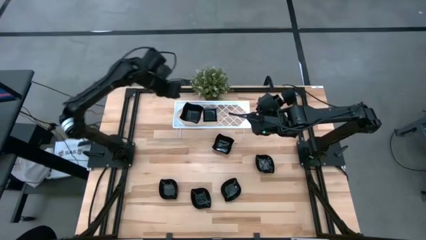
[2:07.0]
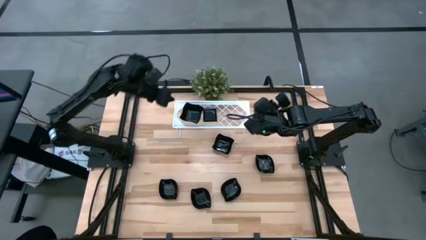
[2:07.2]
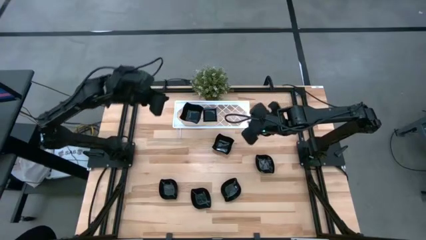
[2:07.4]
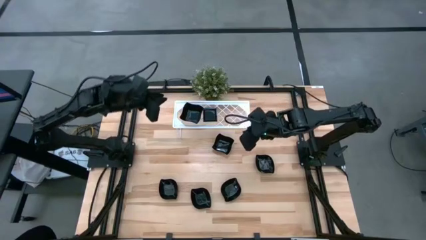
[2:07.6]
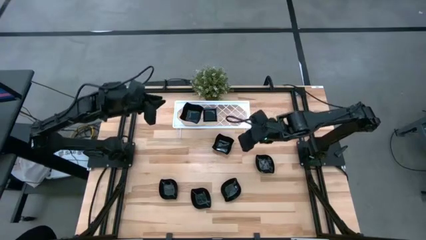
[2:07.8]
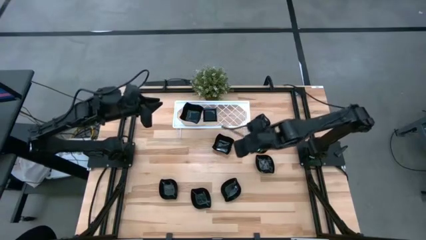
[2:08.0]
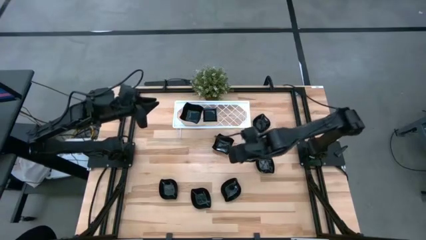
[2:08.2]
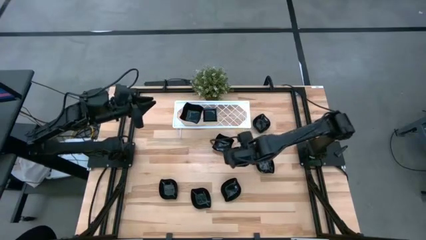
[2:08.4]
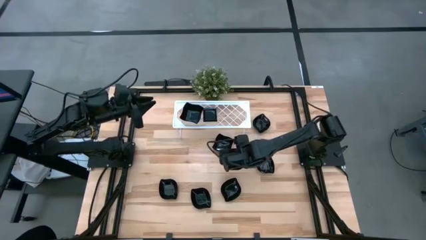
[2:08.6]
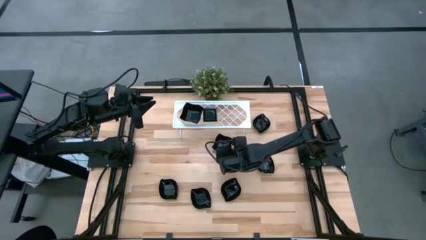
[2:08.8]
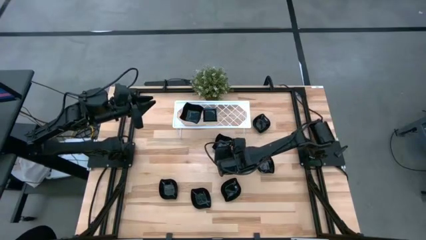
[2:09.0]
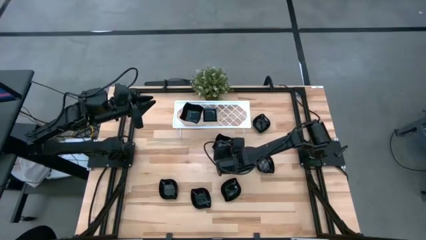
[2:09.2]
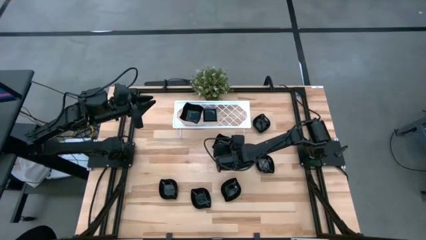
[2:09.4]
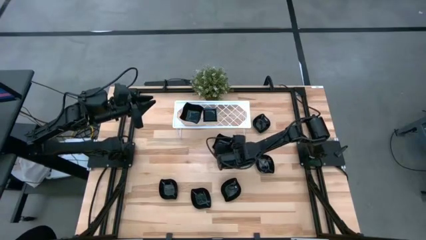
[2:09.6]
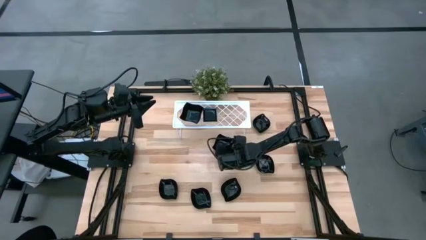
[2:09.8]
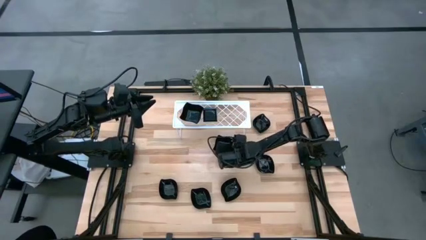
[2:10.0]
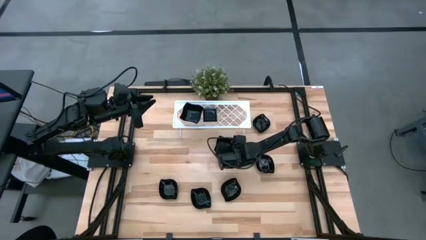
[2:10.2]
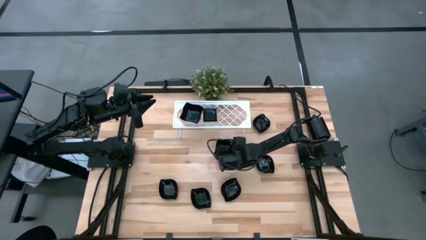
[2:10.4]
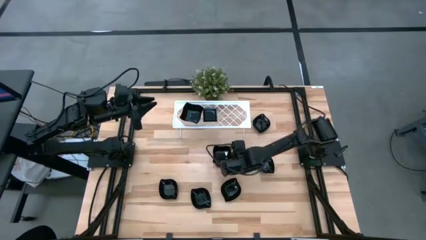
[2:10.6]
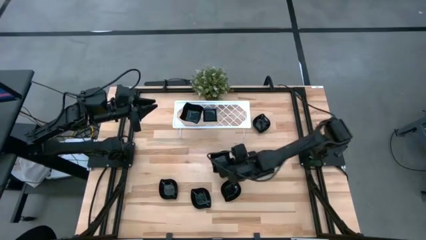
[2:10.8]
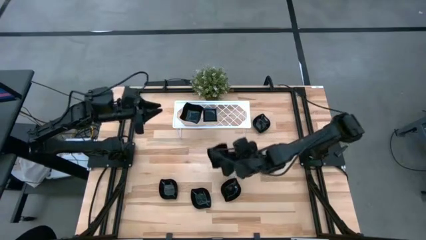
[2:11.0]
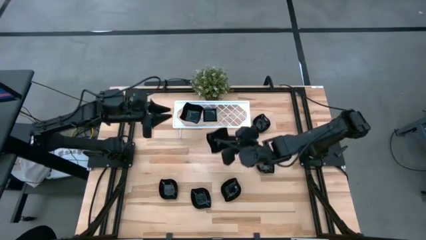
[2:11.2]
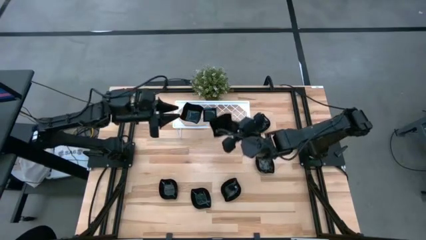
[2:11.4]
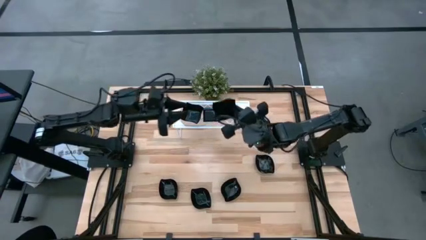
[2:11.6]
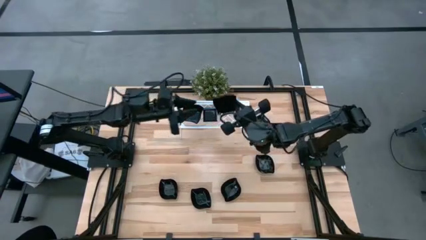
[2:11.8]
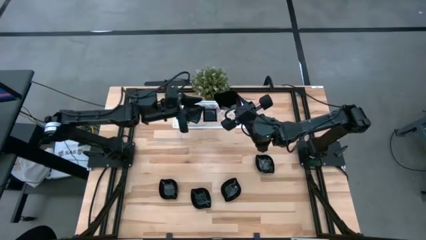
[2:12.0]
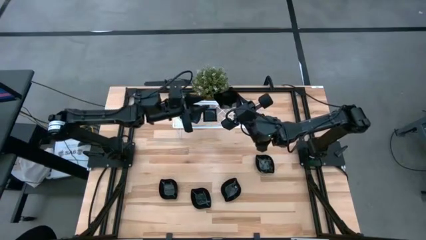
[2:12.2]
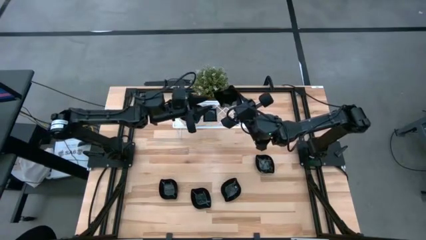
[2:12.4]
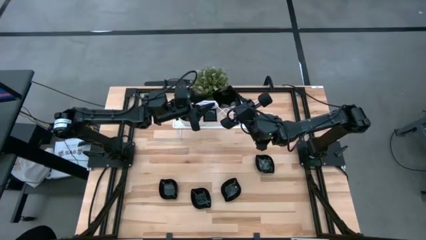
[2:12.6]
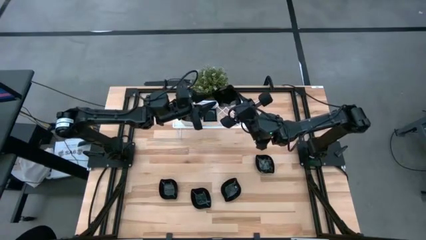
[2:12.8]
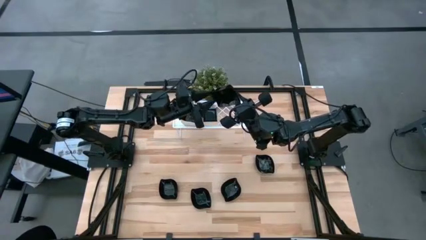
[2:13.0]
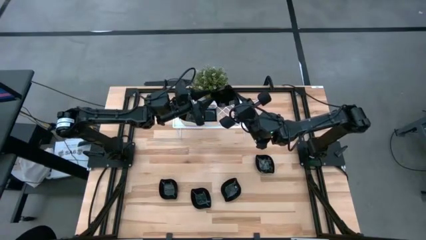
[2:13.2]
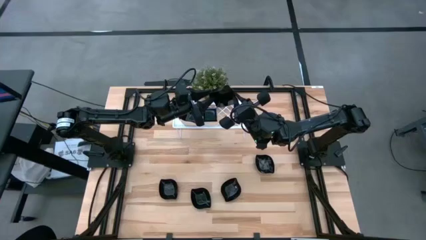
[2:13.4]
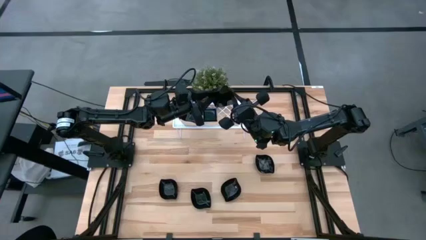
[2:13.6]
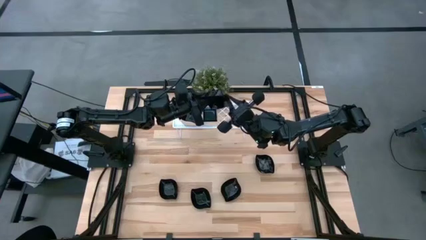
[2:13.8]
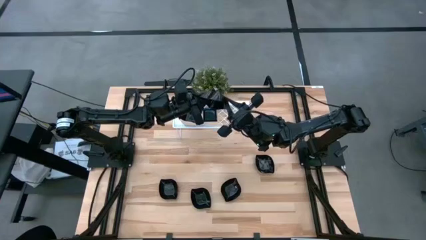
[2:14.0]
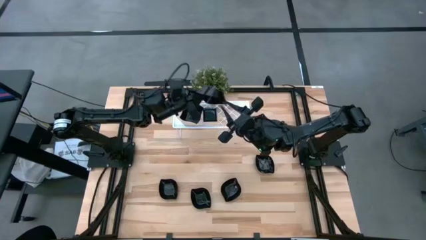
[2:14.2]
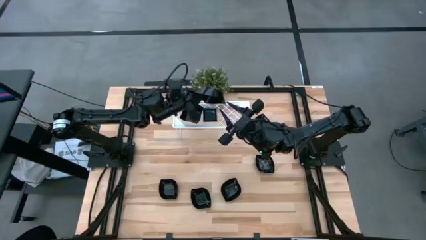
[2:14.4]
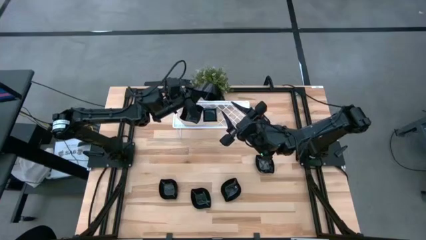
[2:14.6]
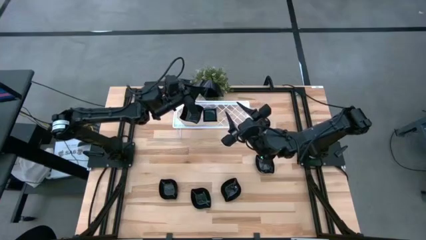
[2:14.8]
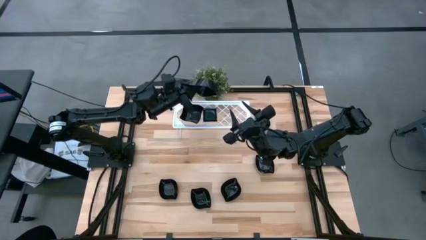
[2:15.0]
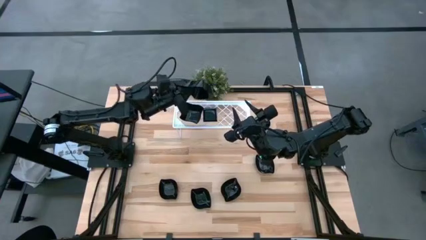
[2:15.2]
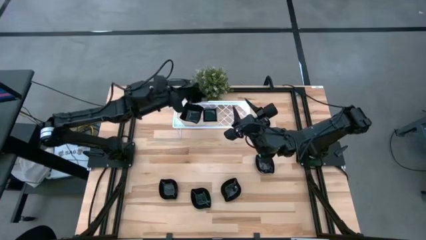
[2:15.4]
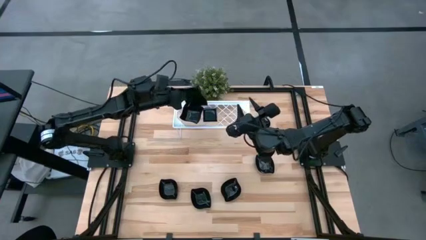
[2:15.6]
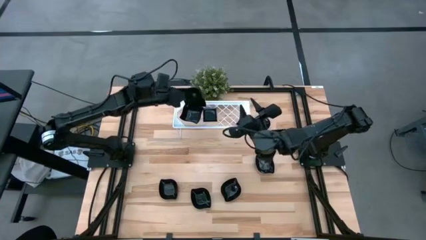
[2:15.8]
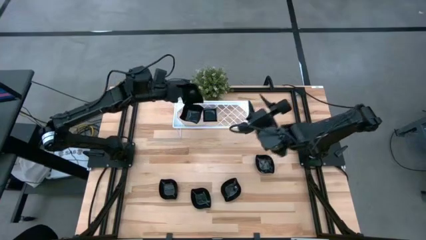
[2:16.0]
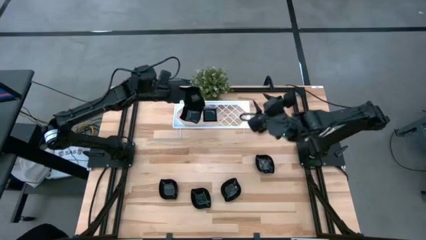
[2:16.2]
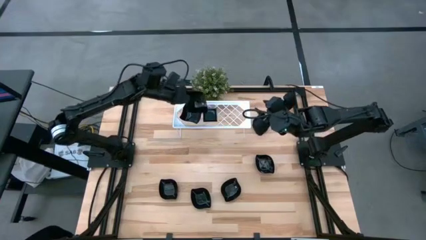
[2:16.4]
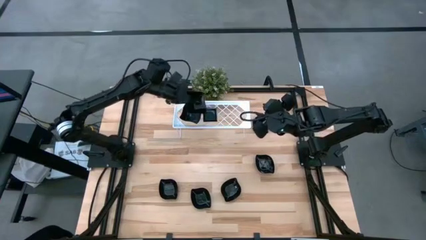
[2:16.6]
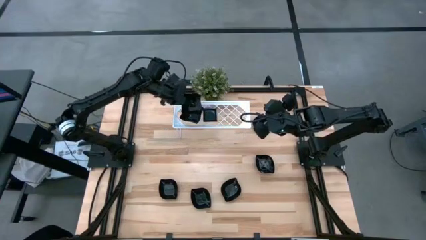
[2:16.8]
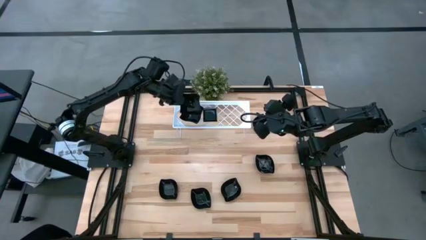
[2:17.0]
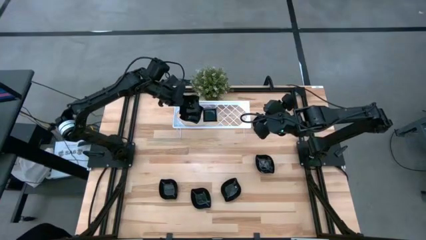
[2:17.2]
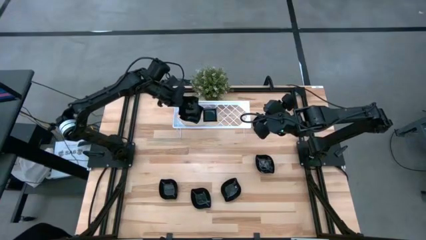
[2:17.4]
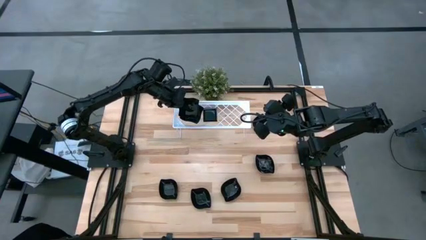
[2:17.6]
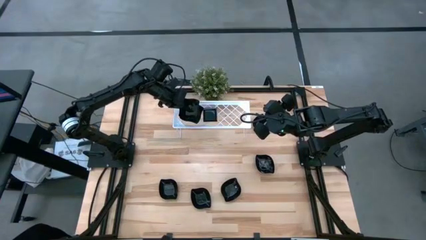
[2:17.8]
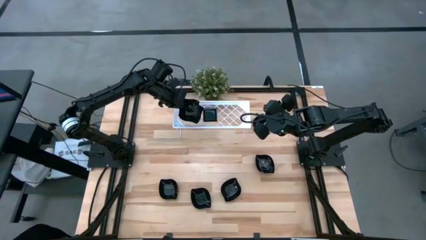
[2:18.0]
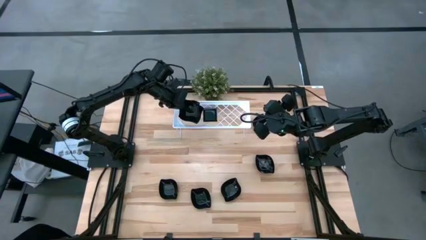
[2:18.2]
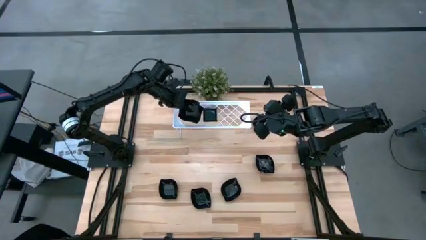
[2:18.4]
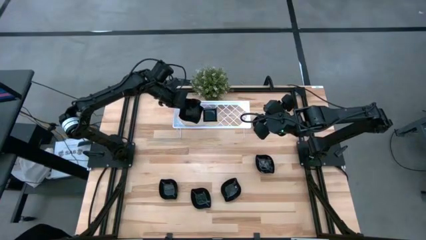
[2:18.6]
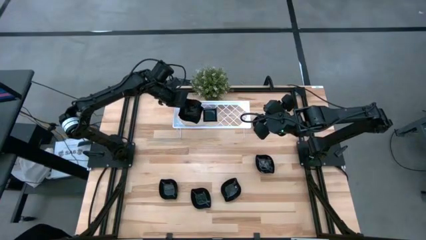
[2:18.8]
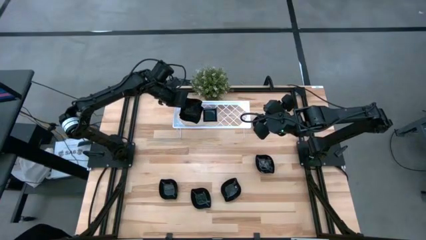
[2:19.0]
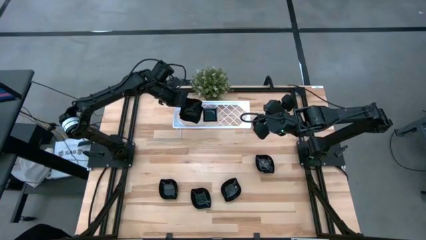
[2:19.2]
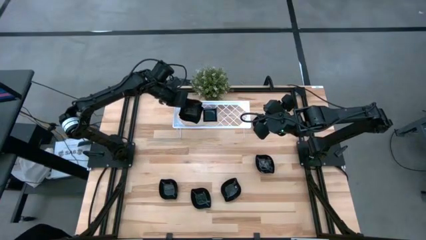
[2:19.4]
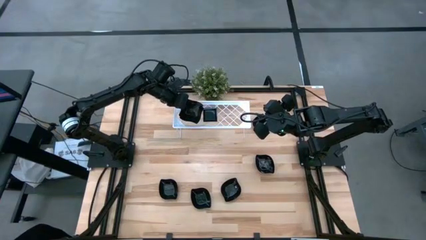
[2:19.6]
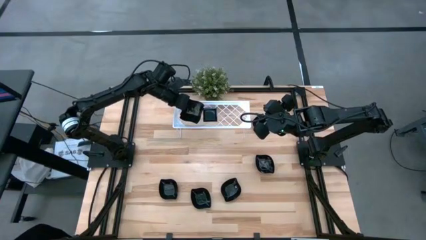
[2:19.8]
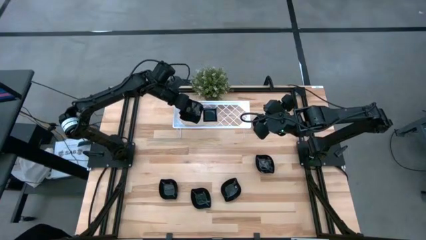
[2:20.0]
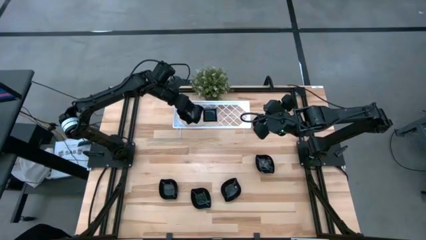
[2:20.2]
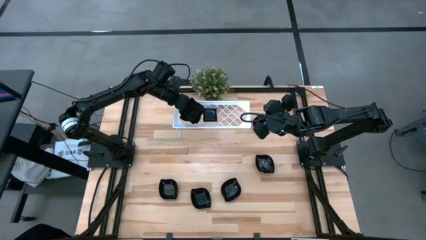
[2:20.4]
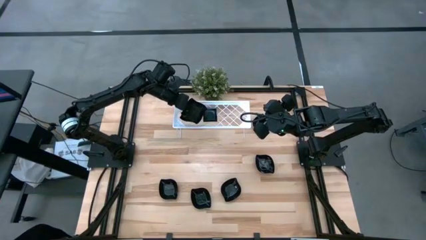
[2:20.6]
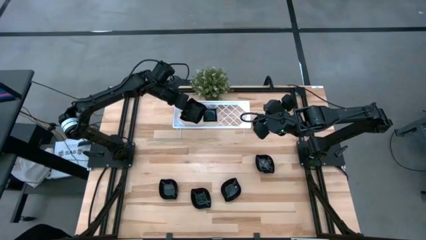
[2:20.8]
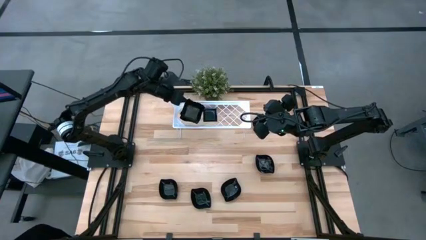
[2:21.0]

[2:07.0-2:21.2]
Task: Pick & Place Mini shaped plates
Stack the distorted square plate on top of the stacked distorted square plate on the shelf
